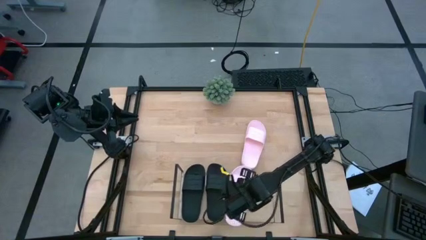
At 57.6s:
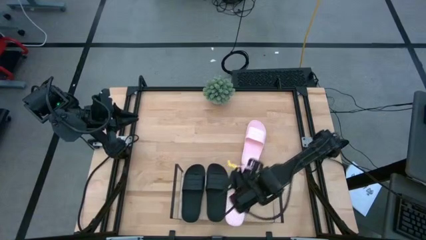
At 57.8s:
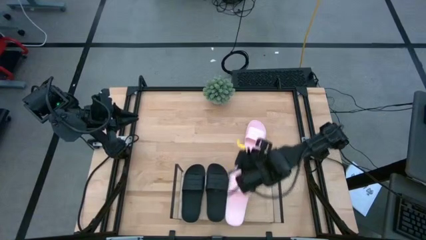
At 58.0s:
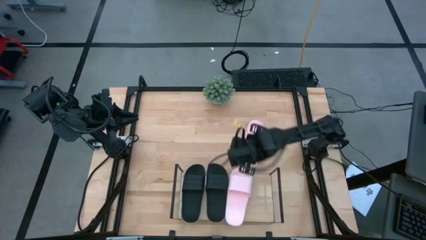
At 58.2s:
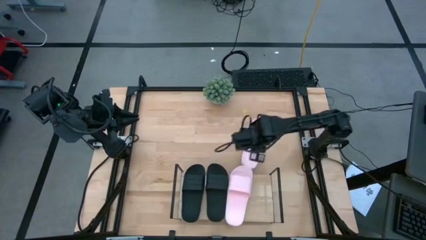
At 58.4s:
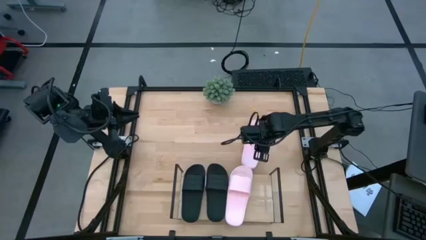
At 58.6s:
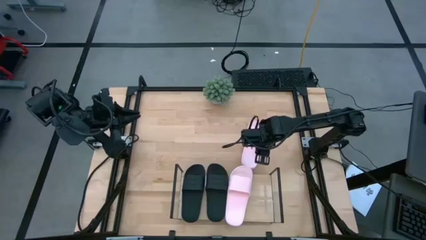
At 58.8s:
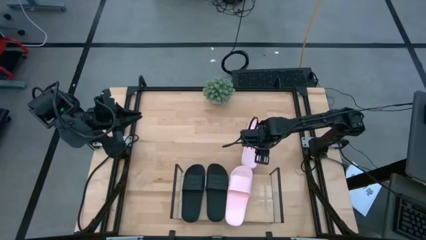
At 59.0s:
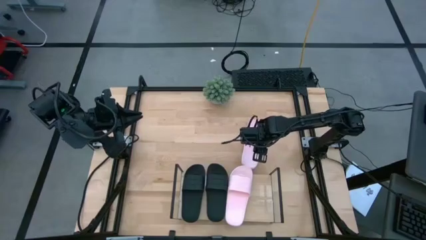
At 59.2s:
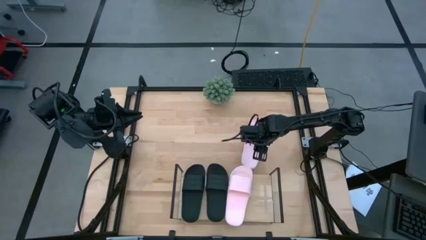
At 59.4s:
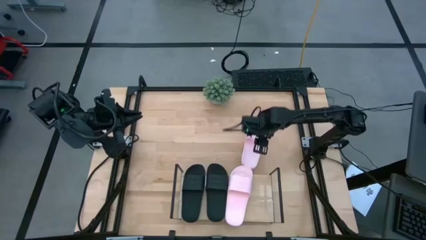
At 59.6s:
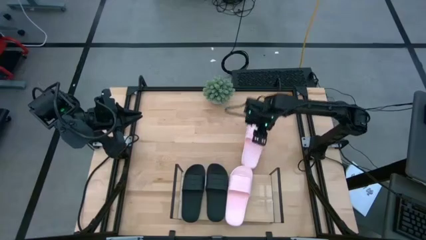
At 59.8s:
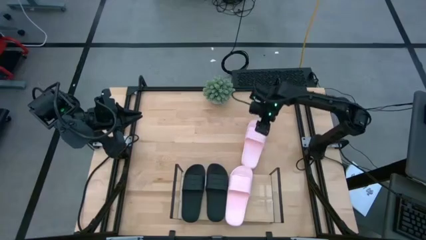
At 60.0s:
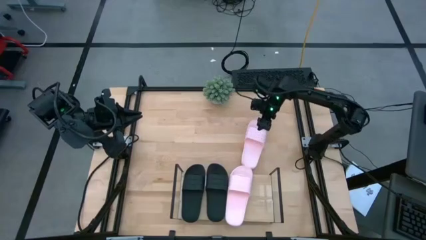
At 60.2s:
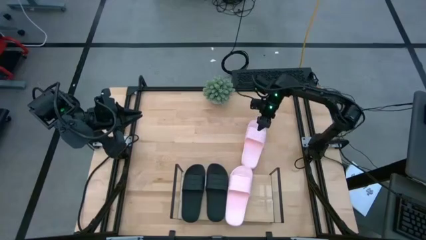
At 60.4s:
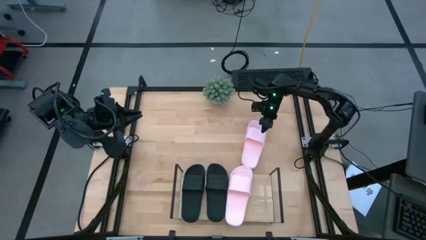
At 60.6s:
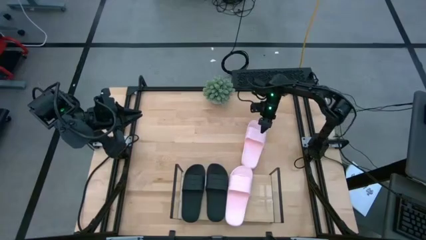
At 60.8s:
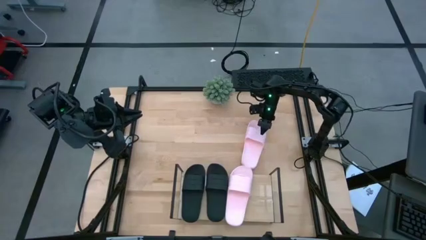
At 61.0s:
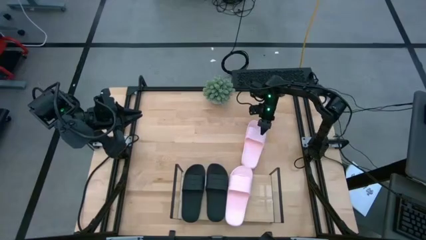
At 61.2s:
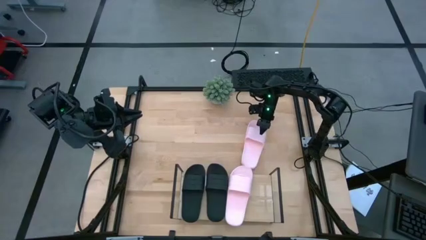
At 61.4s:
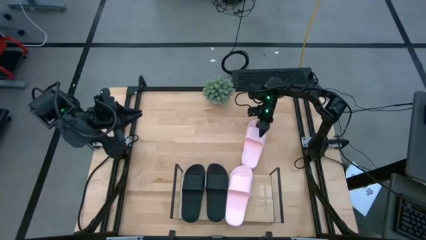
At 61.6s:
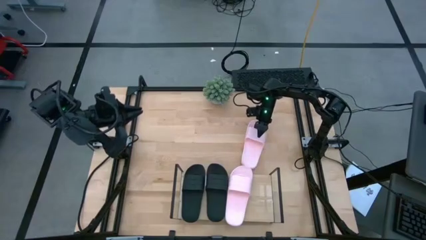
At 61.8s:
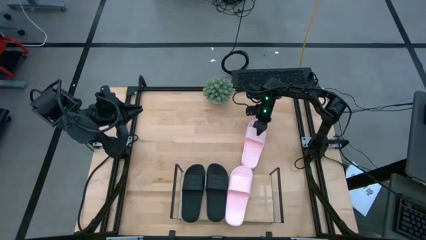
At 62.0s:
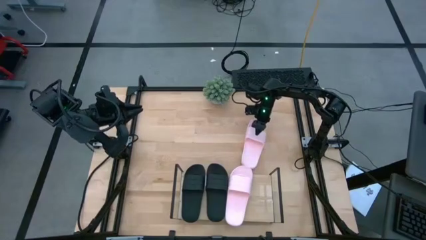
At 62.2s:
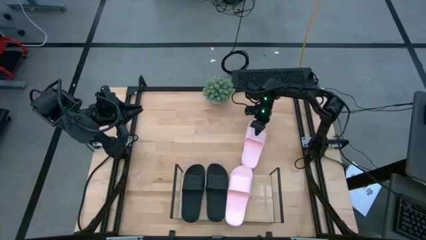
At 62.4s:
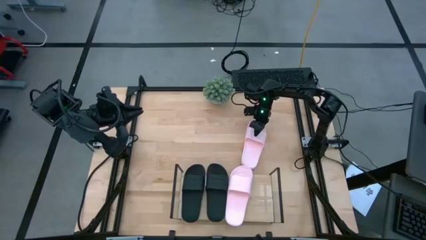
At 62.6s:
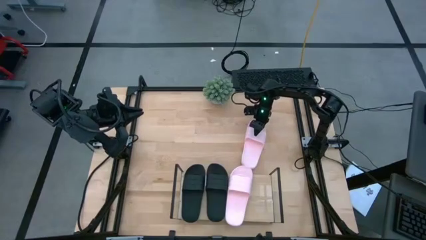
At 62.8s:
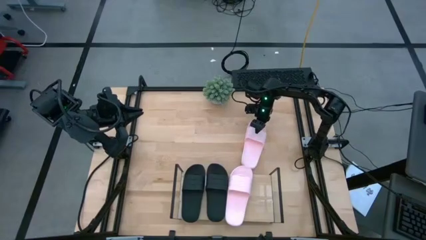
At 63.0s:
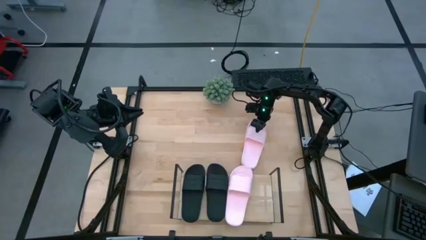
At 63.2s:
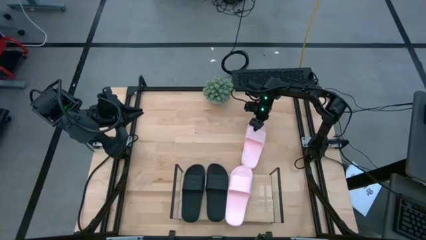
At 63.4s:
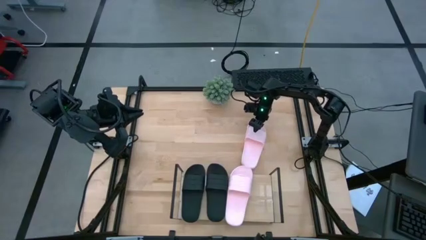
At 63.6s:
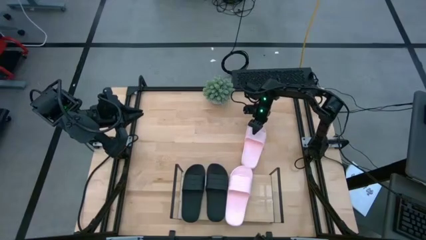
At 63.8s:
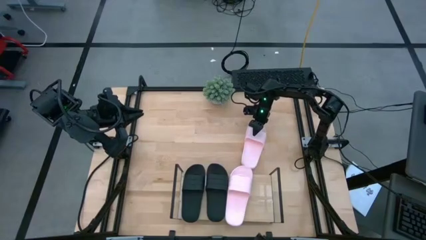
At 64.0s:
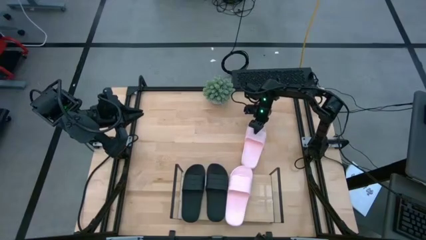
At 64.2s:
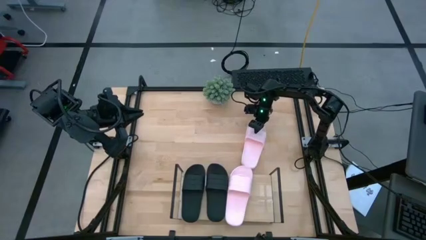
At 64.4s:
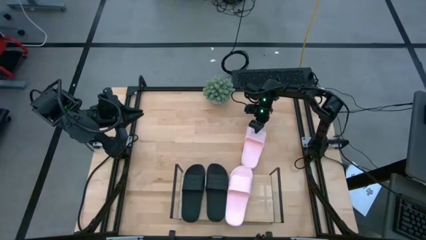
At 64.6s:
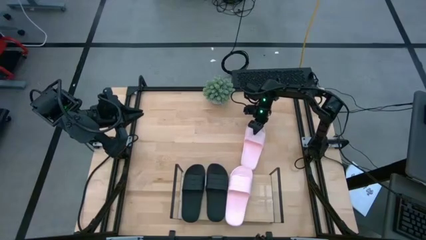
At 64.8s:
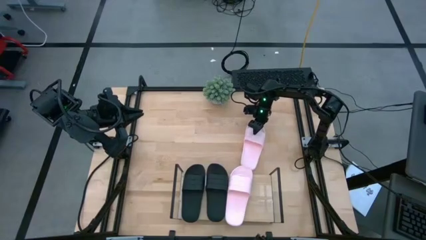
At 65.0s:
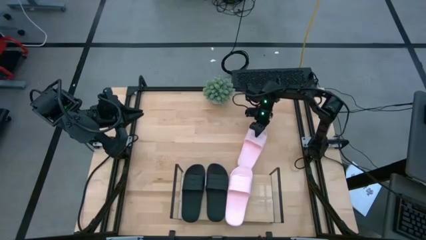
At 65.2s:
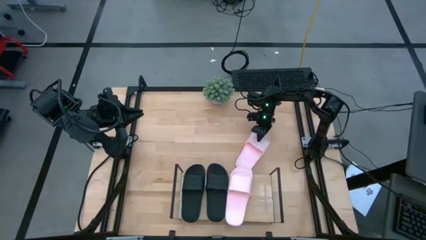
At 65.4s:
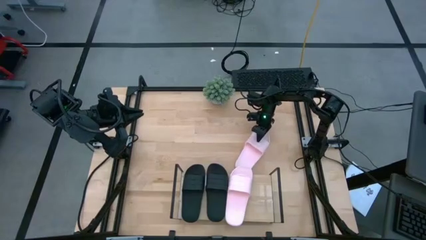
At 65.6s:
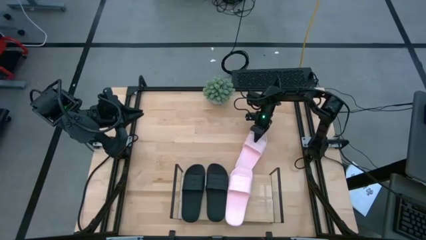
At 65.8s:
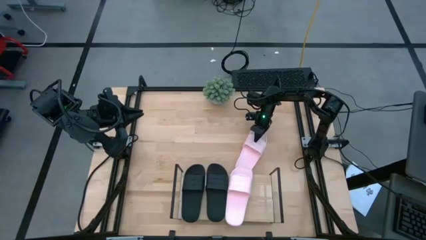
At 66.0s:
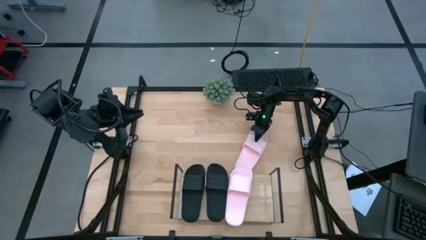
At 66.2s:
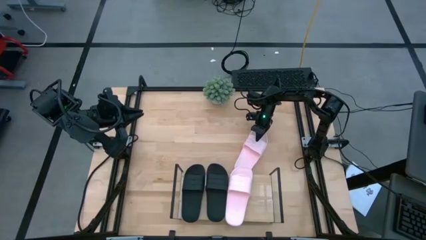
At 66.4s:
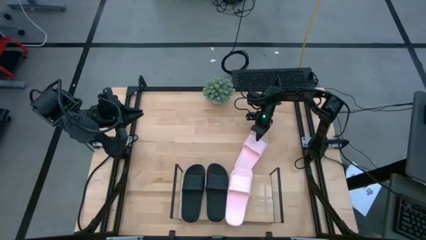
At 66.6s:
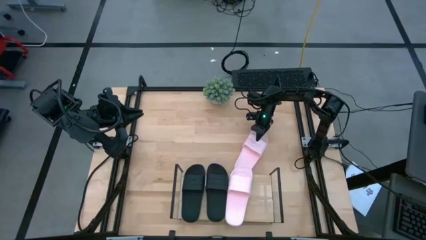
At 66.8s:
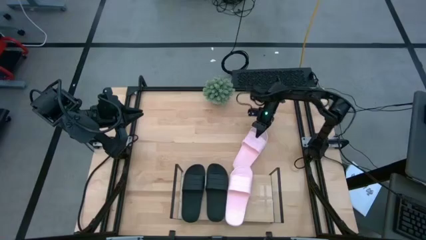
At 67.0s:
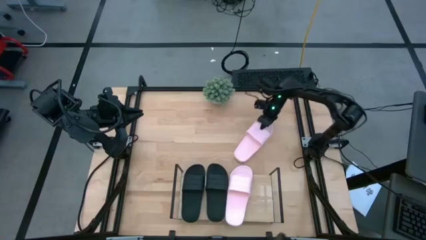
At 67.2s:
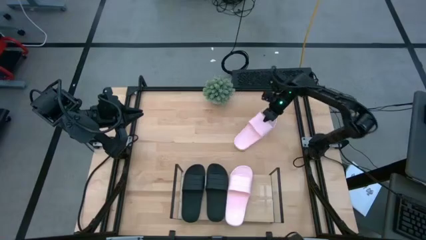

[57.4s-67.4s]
Task: Pick and place slides into the shelf
Put the pink slide on the shelf

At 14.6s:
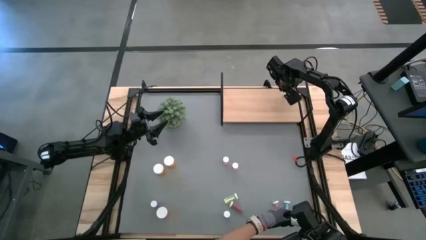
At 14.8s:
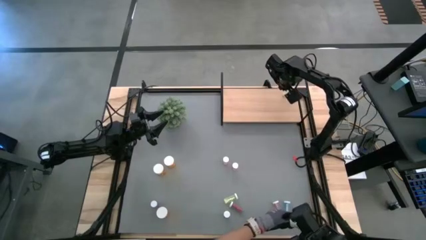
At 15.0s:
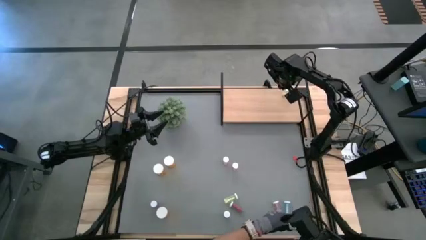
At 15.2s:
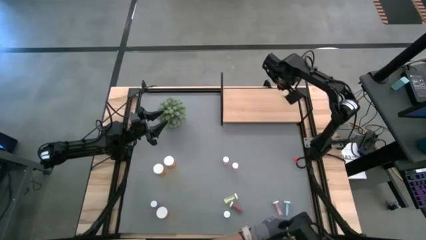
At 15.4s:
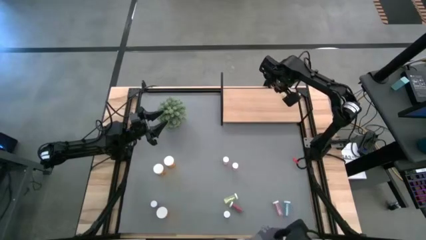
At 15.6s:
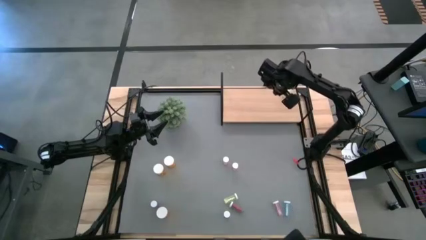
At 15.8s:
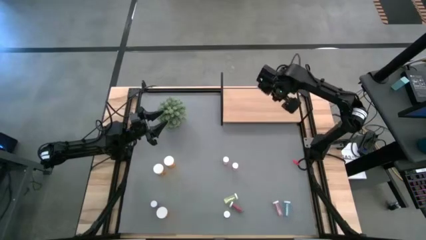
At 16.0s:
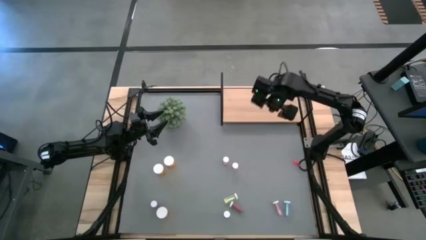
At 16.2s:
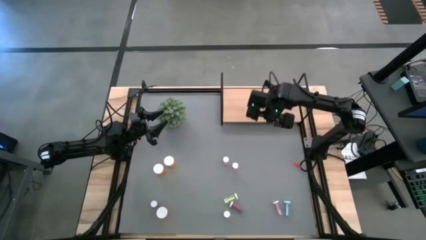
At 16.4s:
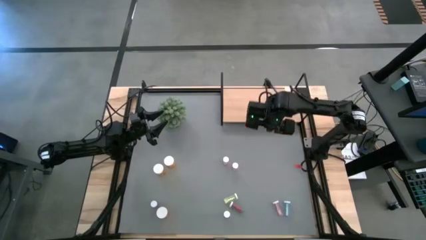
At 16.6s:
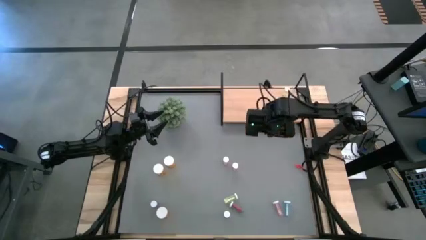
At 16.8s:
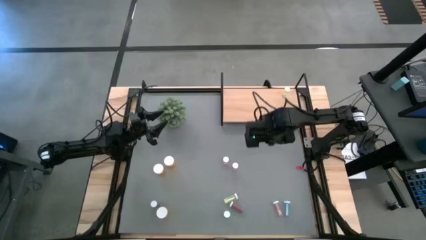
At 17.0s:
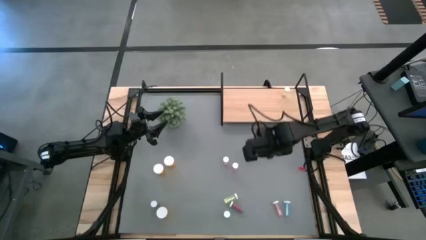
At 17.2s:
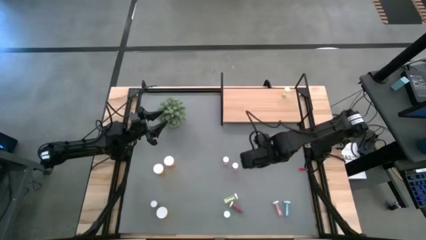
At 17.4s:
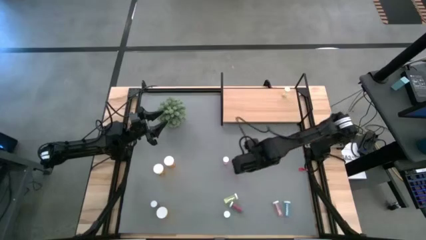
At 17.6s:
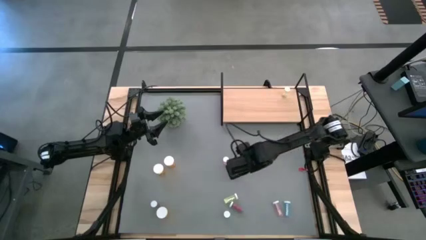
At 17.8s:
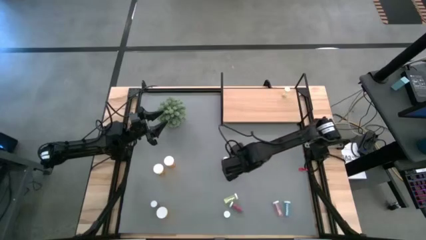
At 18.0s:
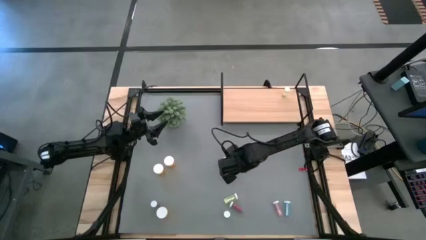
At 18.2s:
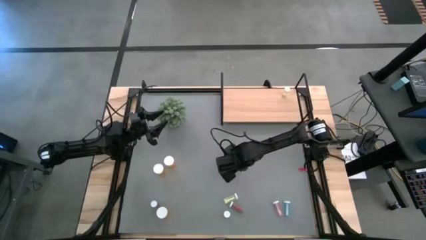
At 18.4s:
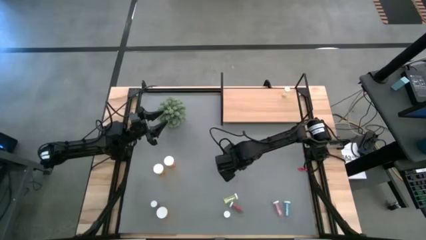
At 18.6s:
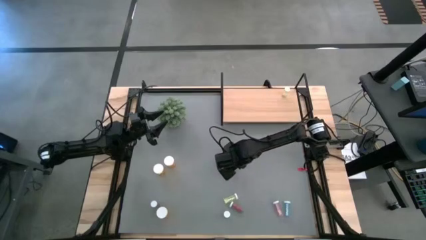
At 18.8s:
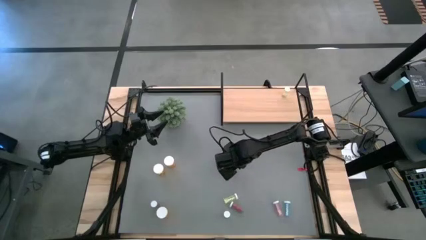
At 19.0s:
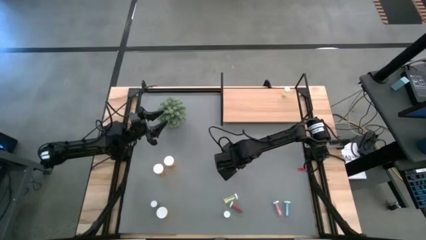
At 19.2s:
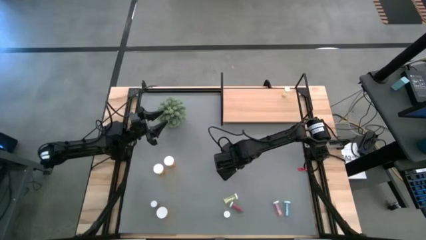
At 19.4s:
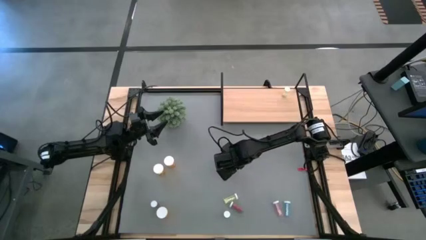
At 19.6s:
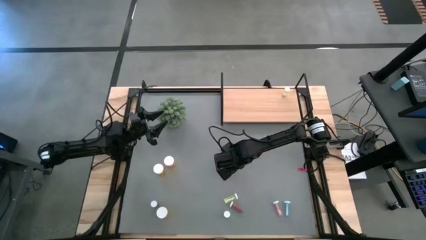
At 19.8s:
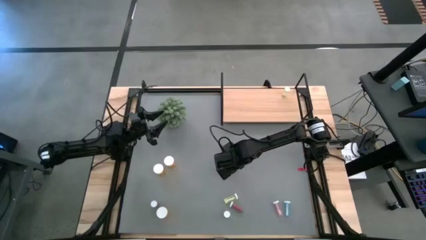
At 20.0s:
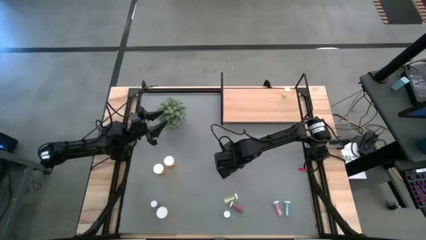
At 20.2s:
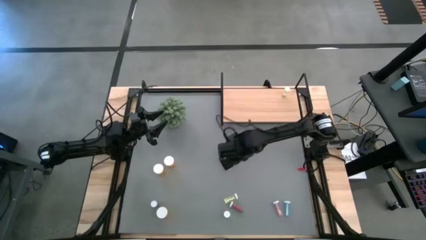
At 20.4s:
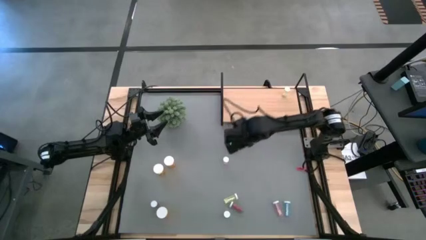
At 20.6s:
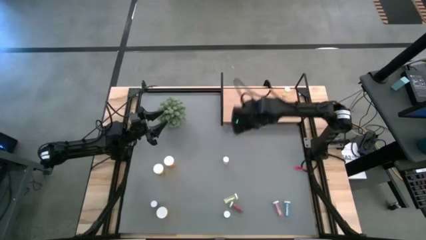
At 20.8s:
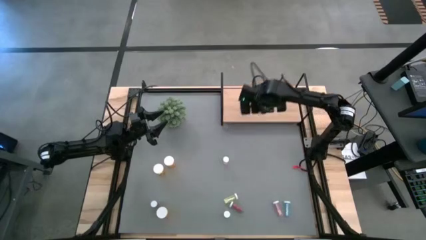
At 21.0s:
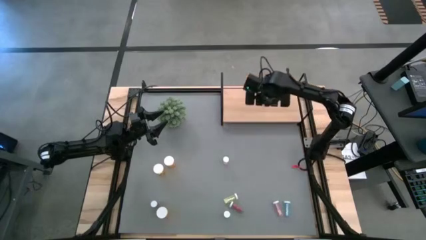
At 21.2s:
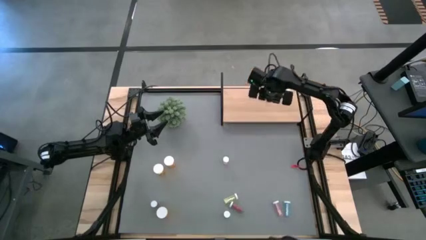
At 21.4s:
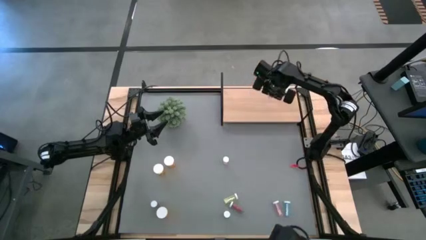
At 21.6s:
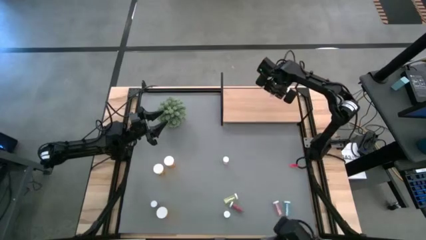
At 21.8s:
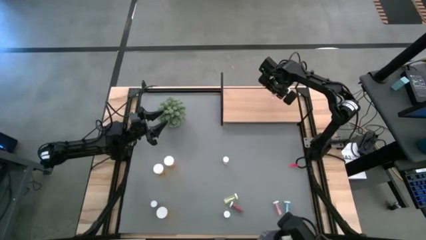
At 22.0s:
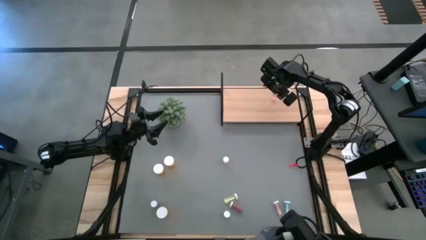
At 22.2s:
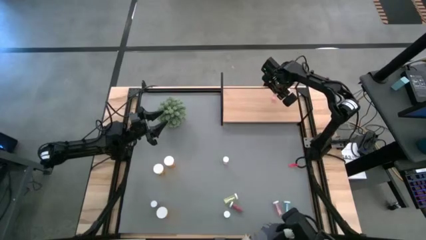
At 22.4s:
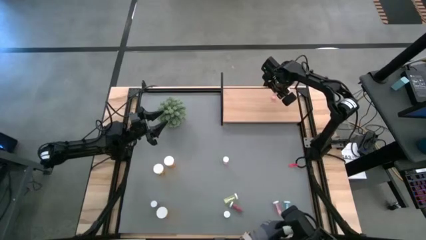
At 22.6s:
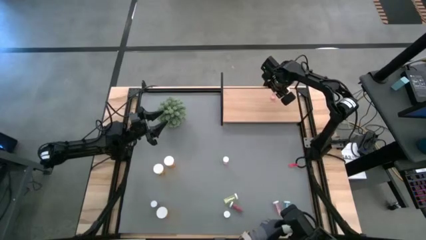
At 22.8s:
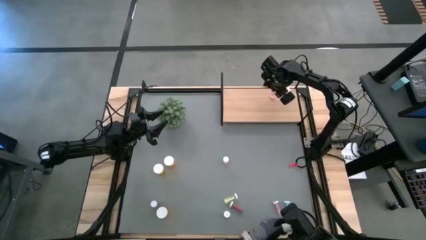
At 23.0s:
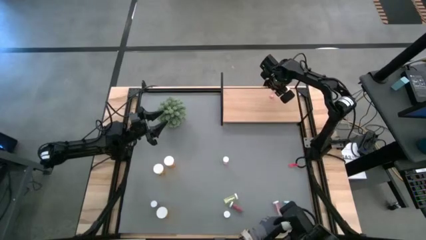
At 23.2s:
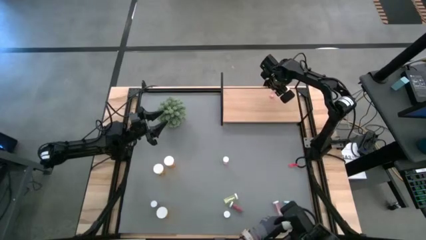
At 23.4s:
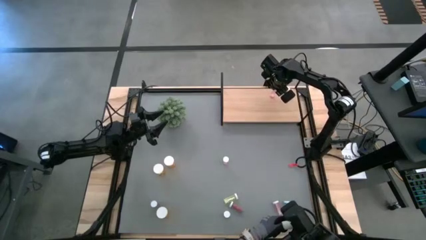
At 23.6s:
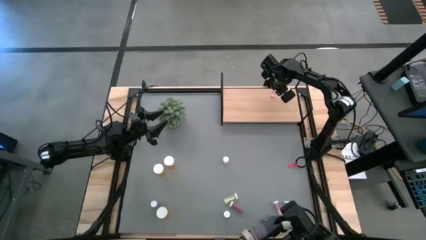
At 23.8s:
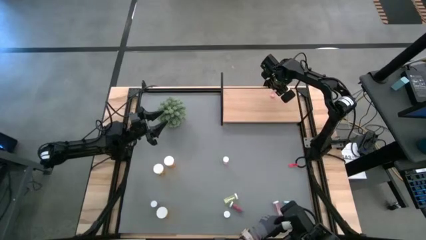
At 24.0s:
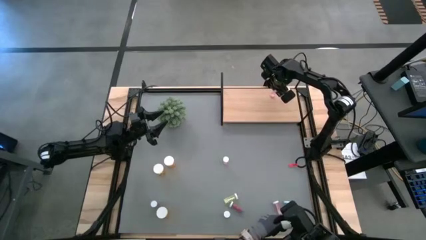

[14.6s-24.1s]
Task: Pick and place medicine bottles onto shelf by color
Put the bottom left pink pill bottle on the shelf
